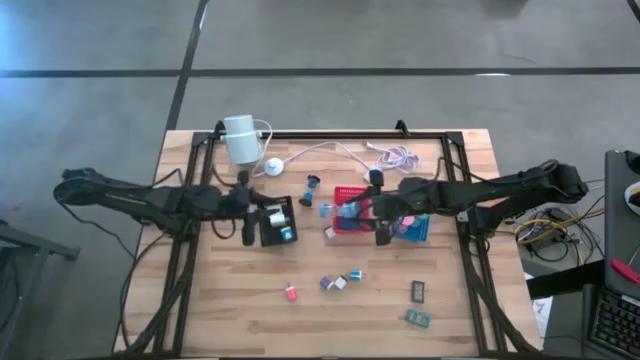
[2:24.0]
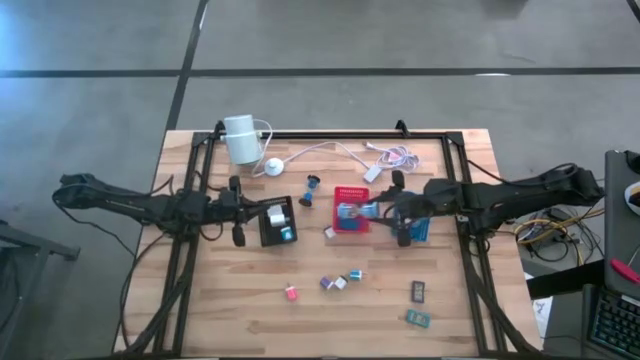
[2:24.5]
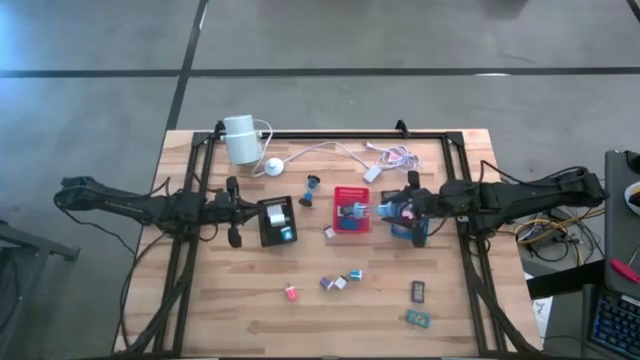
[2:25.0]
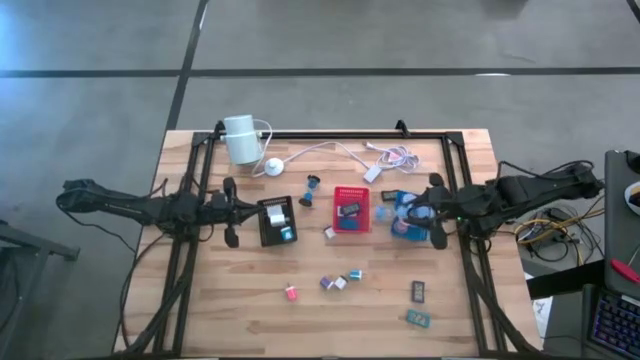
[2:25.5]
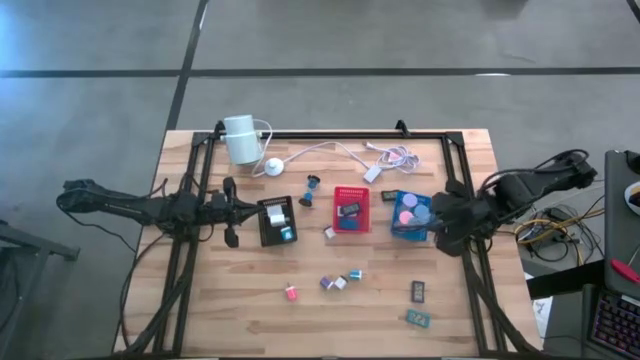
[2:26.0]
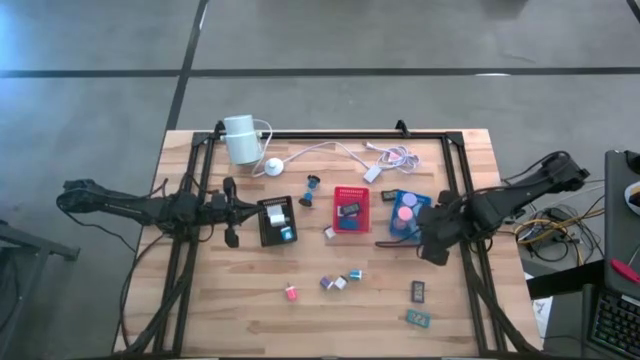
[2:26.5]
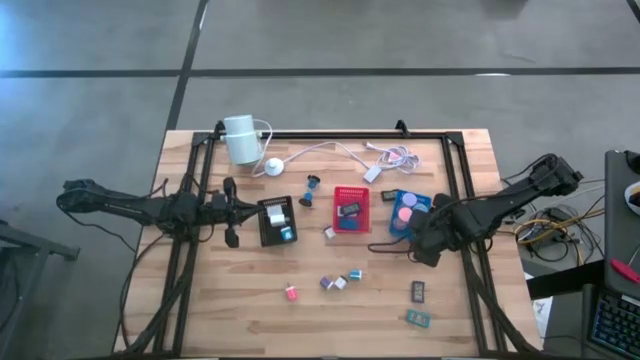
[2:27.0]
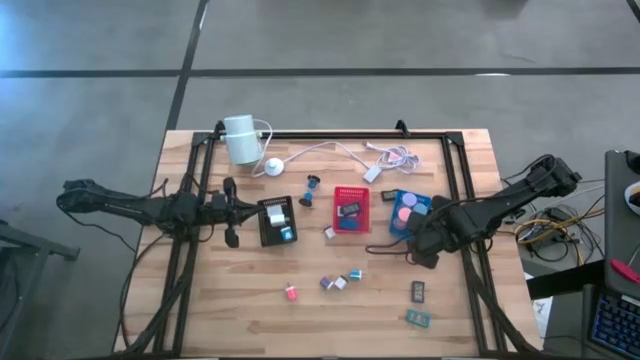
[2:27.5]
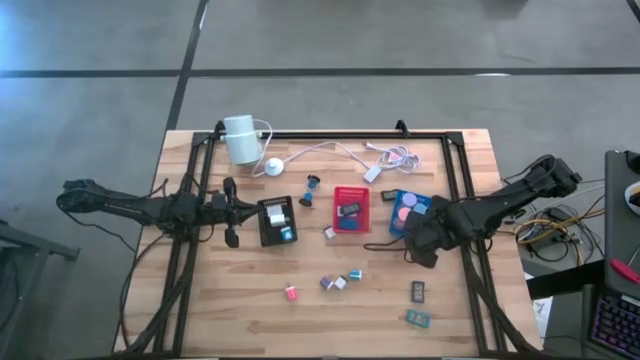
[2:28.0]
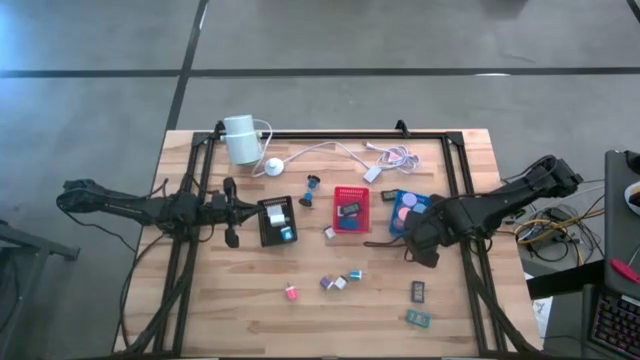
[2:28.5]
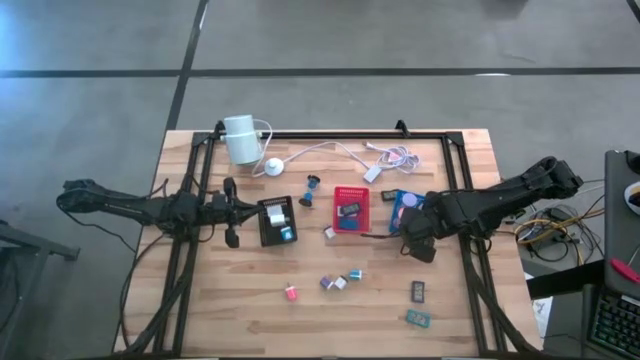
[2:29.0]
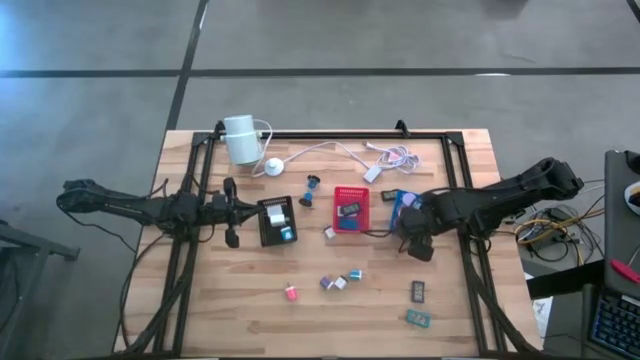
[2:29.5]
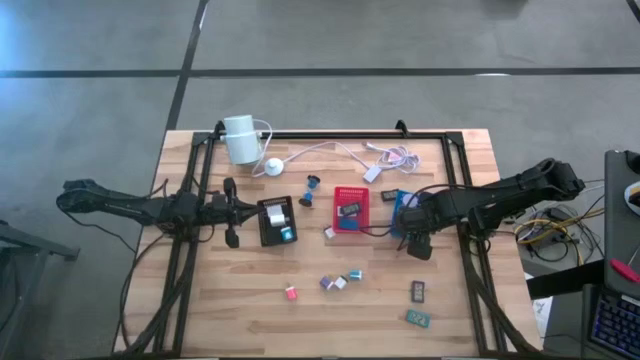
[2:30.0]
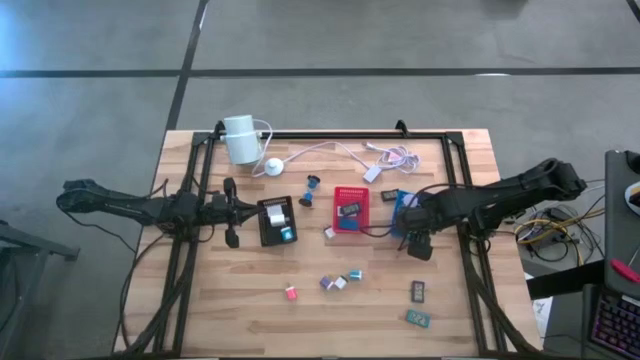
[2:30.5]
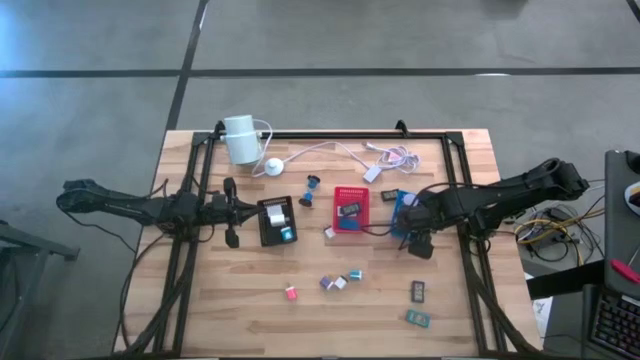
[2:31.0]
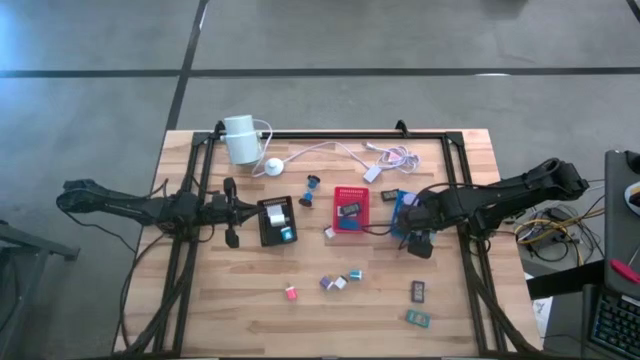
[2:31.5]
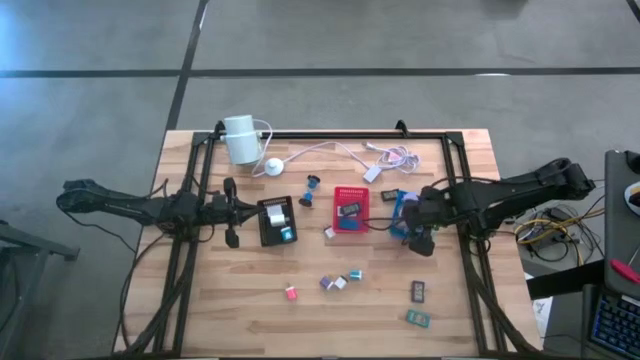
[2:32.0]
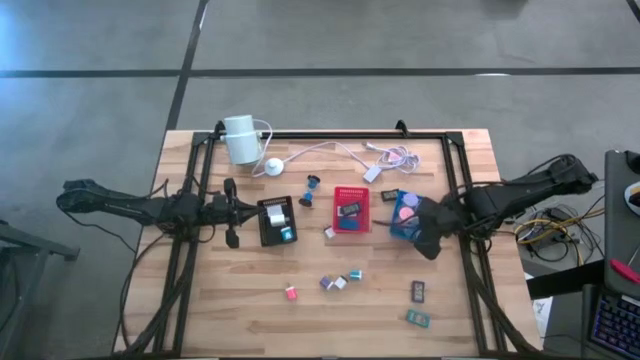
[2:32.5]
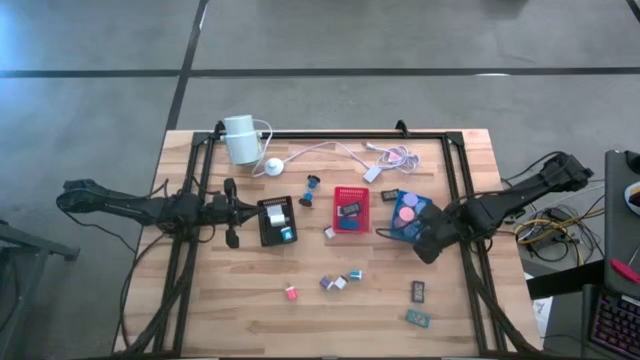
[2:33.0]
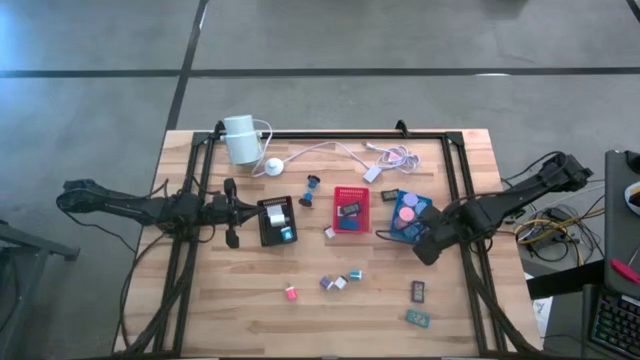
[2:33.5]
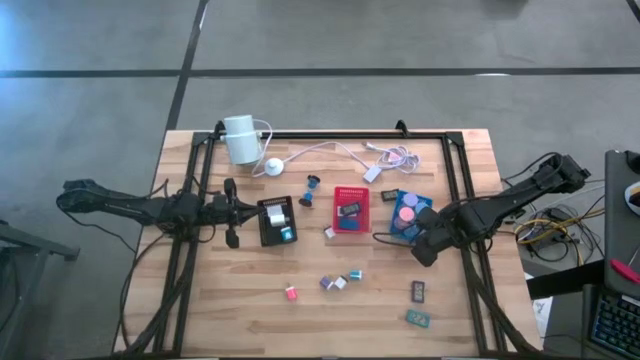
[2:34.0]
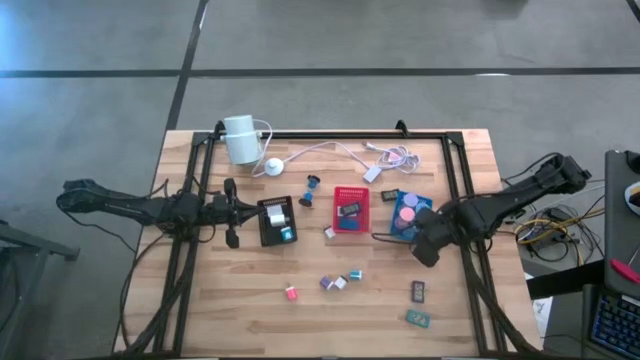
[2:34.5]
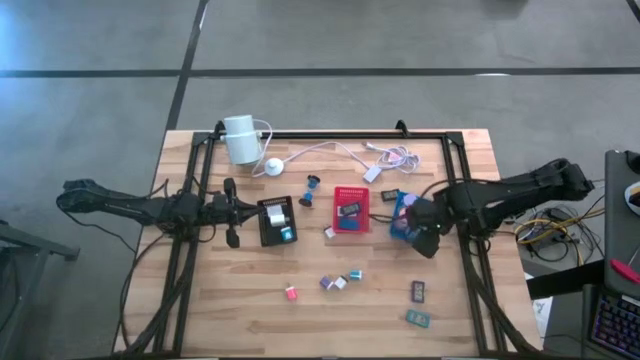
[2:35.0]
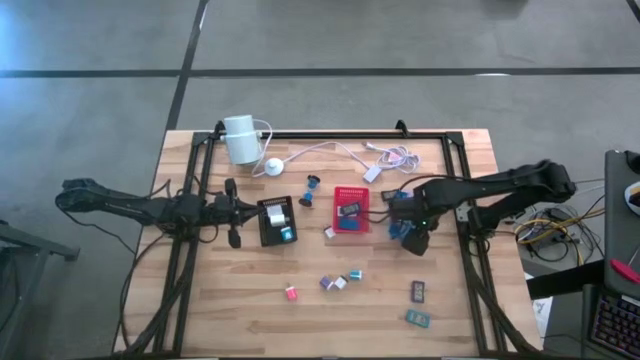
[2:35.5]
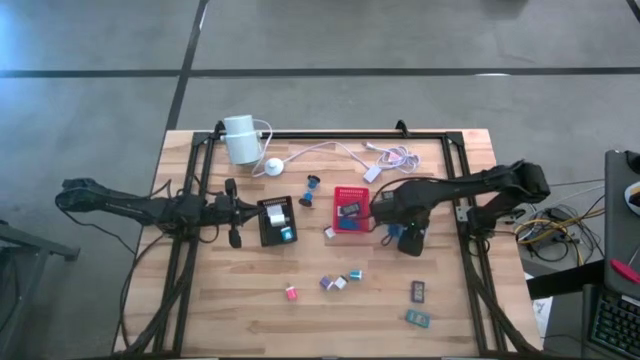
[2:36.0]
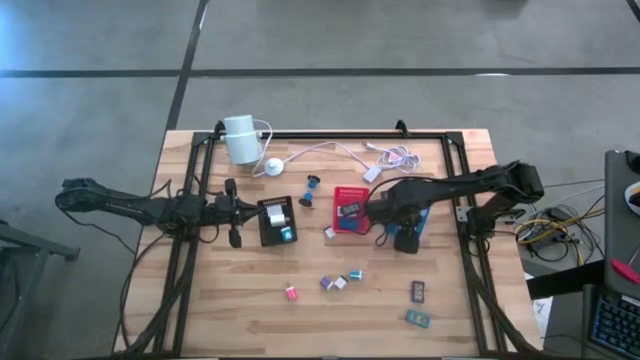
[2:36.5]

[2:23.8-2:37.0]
Task: Pick & Place Office items
Put the light blue hourglass into the blue bin

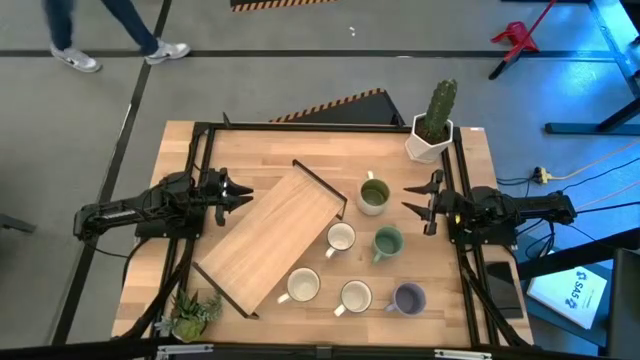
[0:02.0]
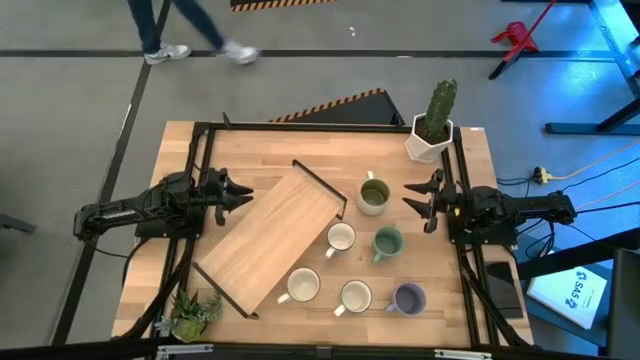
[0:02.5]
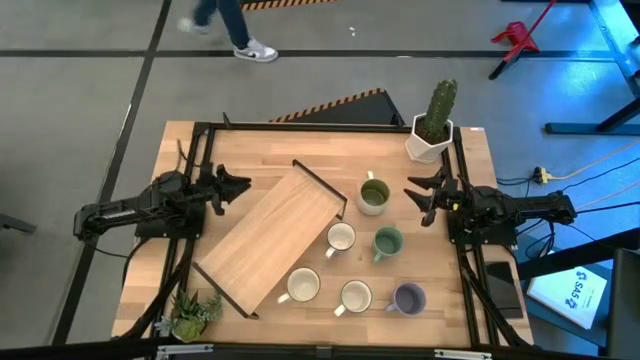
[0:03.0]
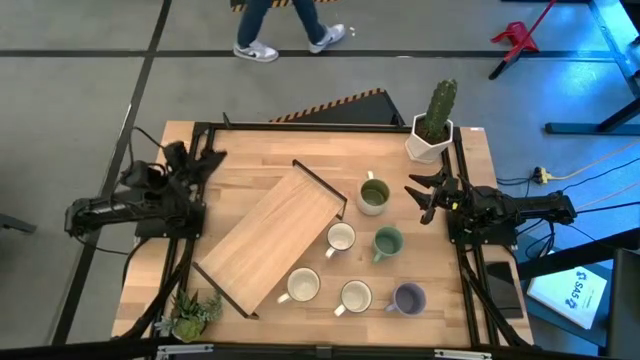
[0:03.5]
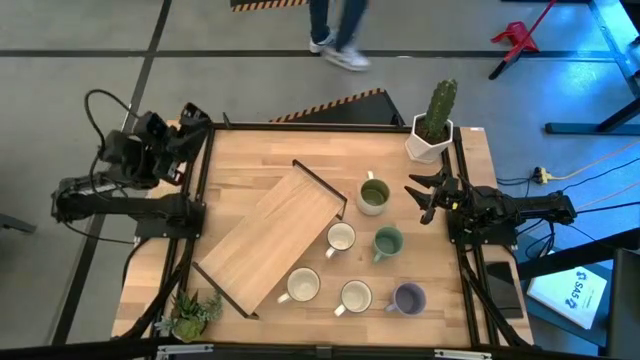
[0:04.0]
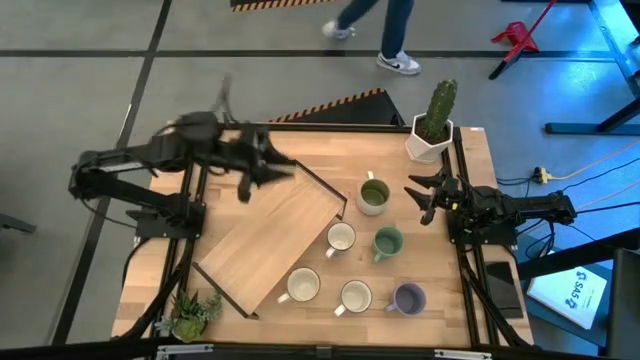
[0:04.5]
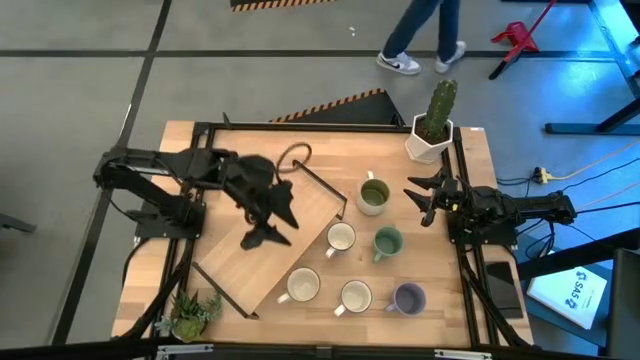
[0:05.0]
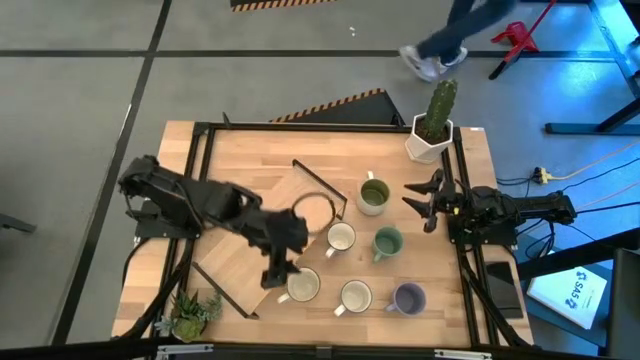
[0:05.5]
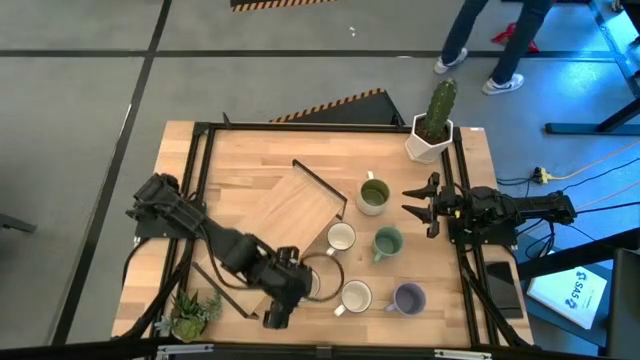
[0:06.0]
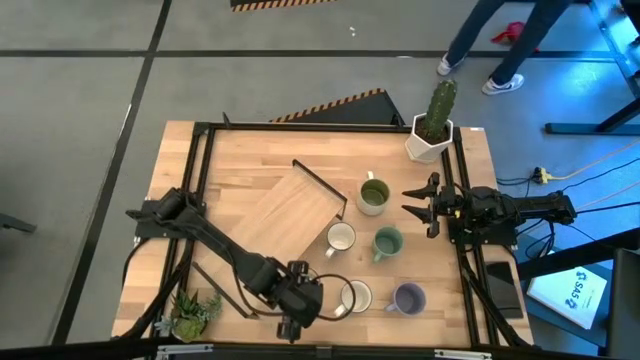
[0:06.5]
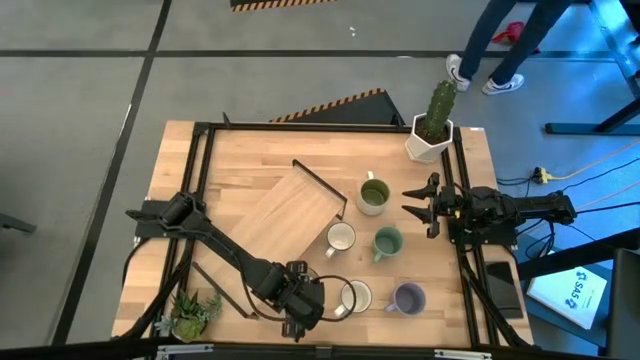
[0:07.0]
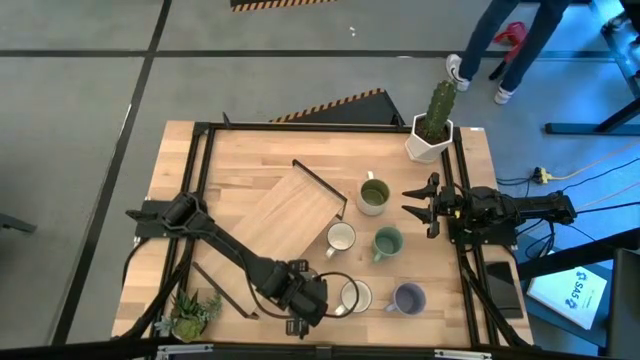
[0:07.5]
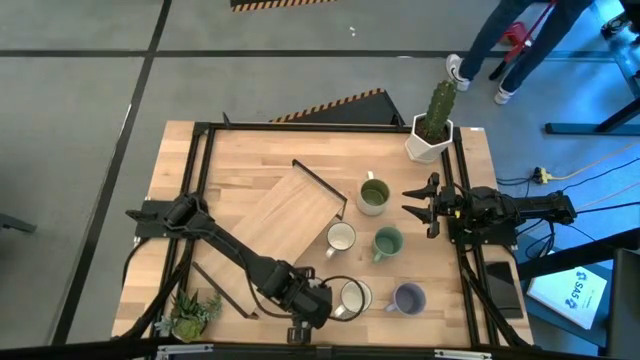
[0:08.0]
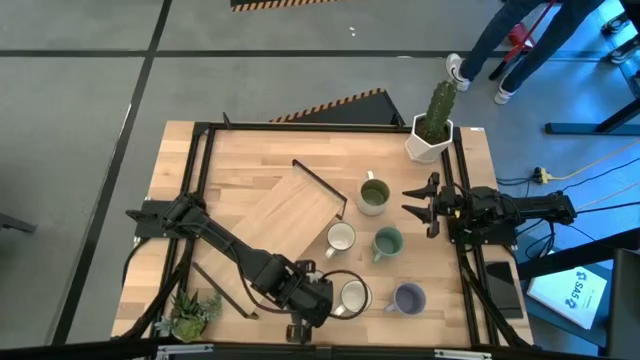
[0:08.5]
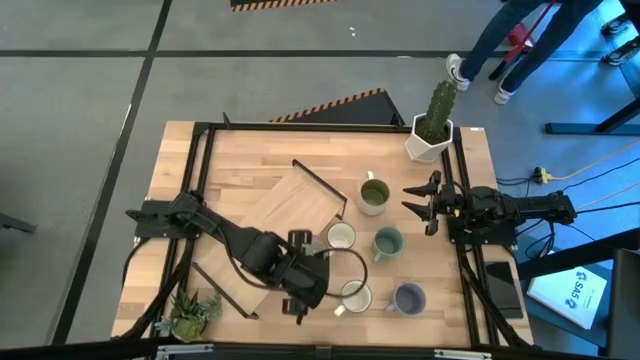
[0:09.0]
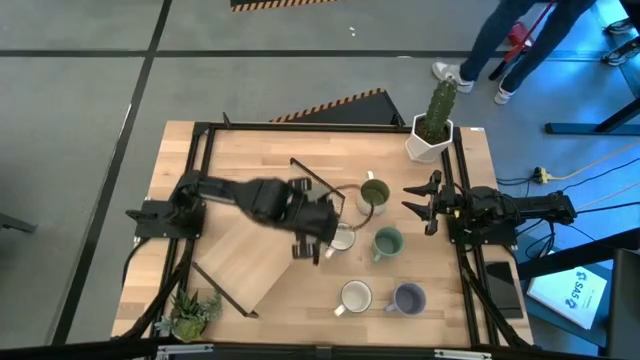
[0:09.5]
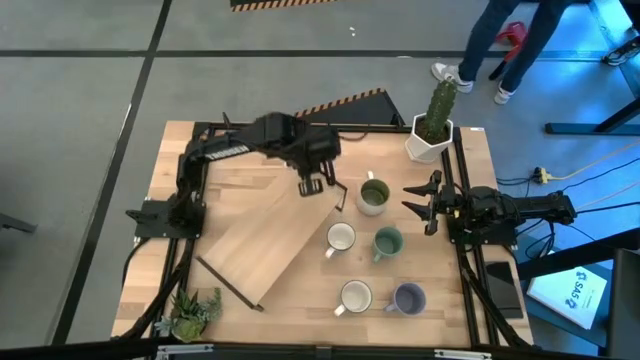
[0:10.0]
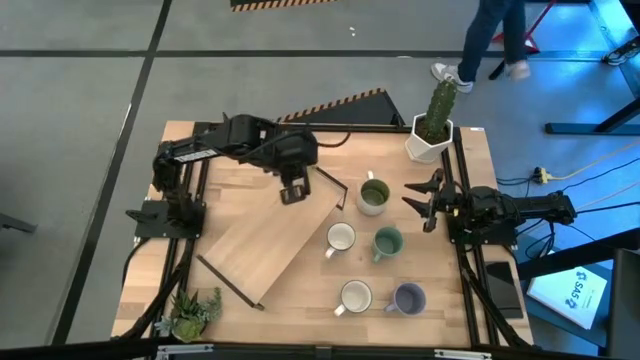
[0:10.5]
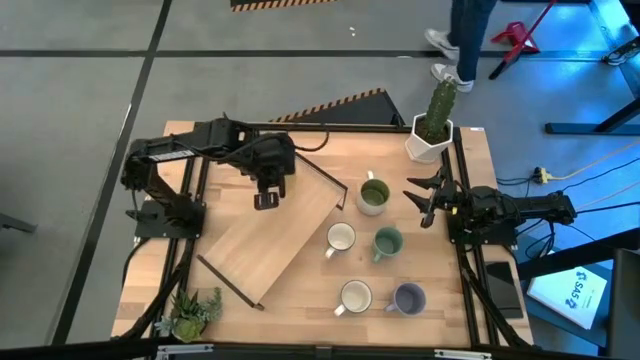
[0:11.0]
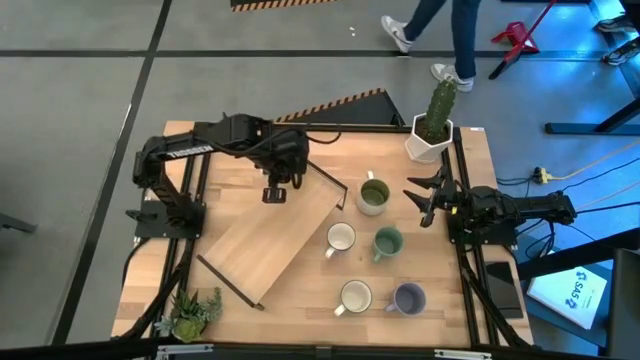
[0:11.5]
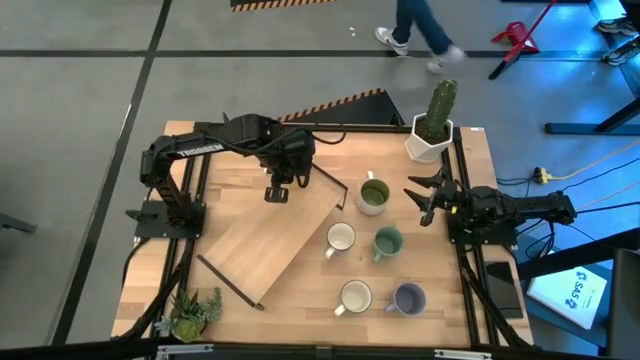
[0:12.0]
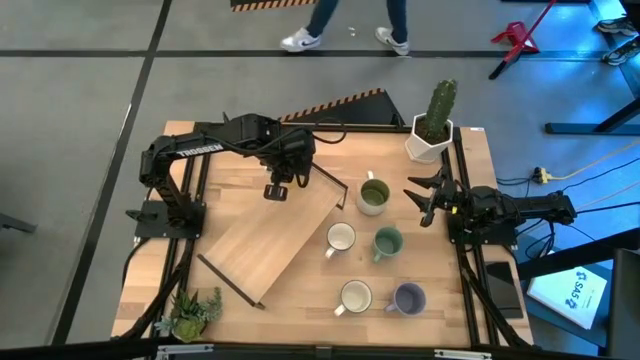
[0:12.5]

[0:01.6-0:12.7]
Task: Place coffee mugs
Put the yellow mug on the shelf
